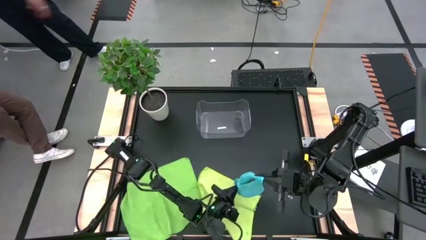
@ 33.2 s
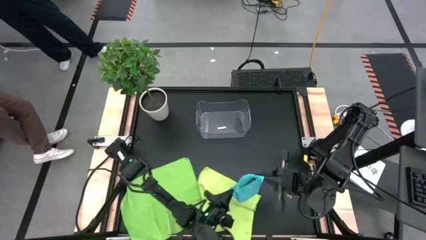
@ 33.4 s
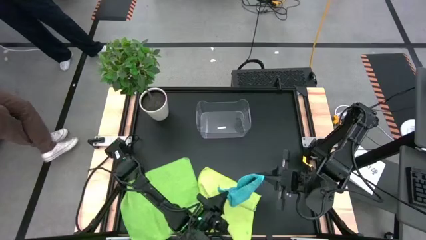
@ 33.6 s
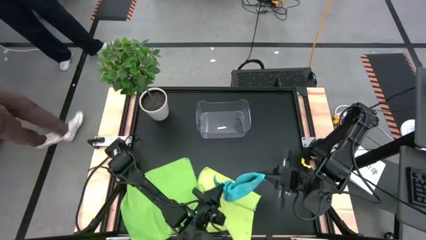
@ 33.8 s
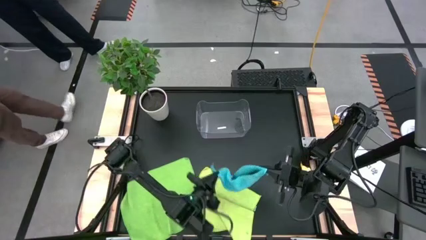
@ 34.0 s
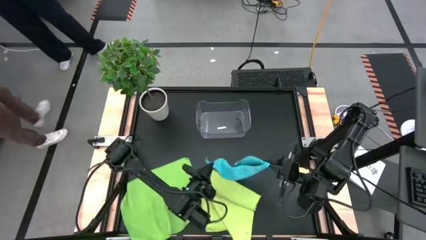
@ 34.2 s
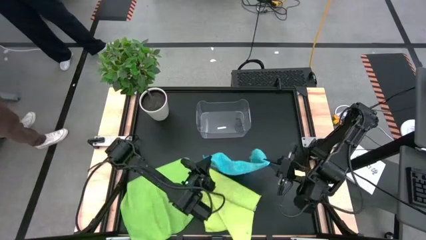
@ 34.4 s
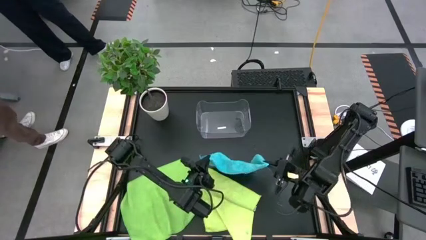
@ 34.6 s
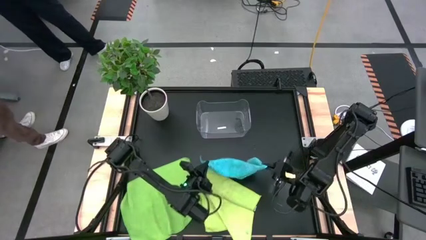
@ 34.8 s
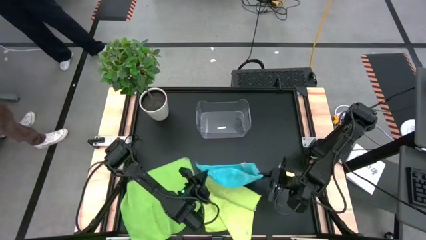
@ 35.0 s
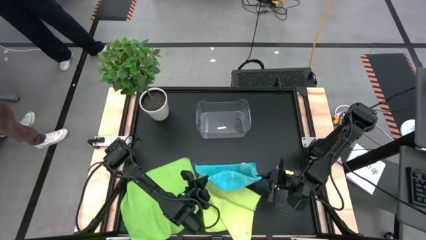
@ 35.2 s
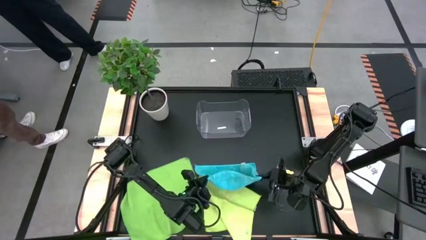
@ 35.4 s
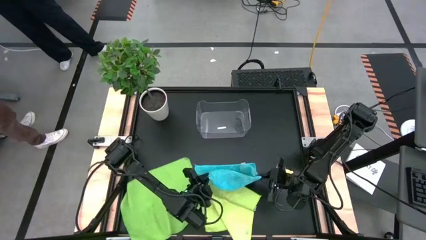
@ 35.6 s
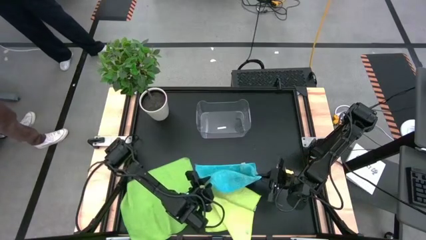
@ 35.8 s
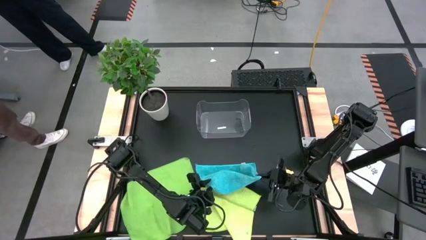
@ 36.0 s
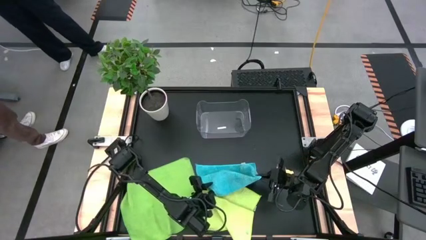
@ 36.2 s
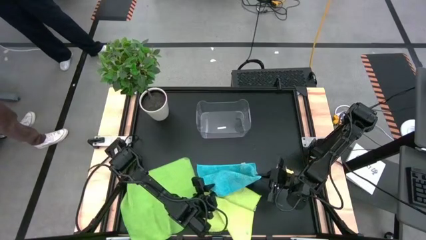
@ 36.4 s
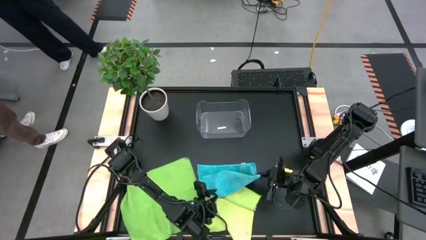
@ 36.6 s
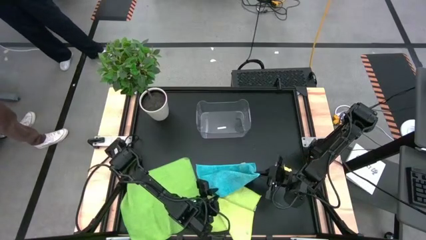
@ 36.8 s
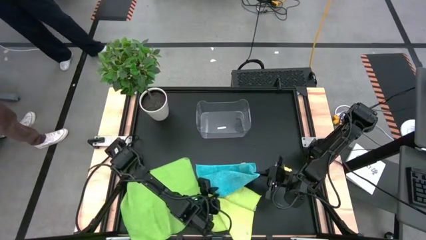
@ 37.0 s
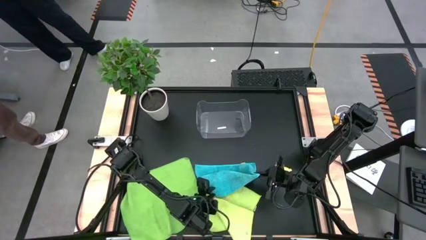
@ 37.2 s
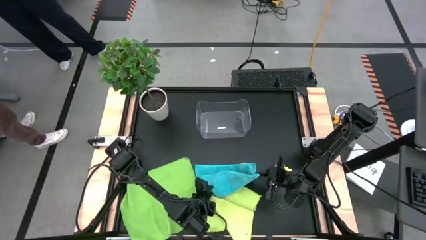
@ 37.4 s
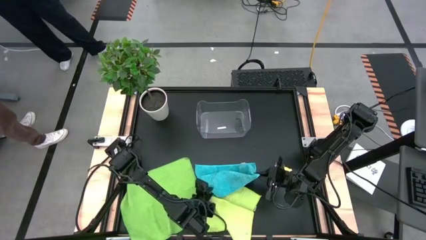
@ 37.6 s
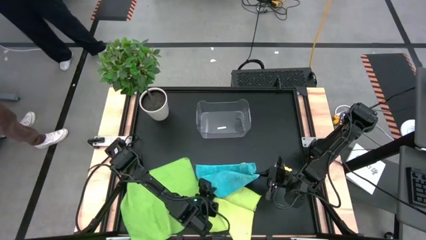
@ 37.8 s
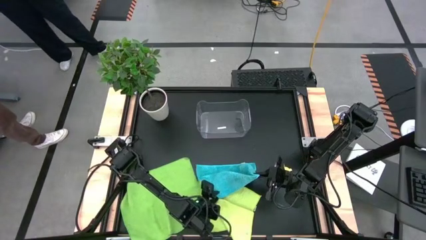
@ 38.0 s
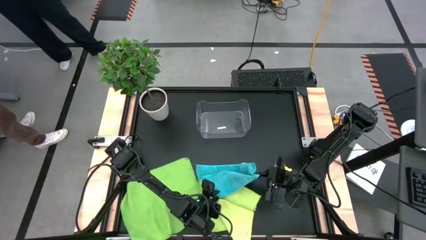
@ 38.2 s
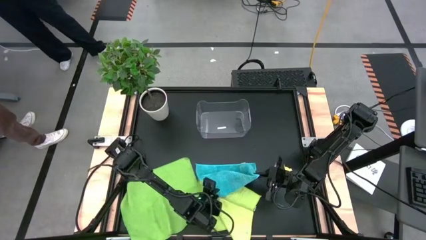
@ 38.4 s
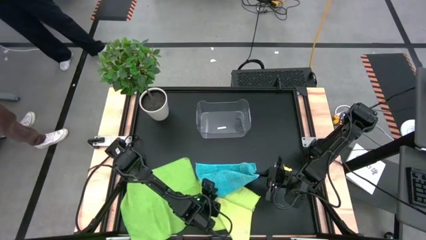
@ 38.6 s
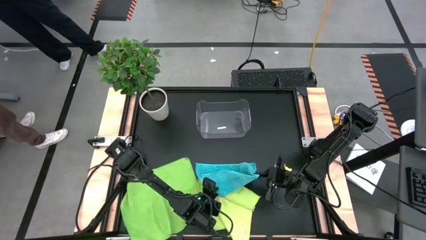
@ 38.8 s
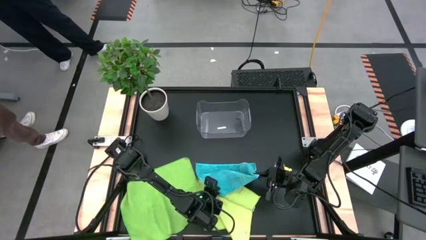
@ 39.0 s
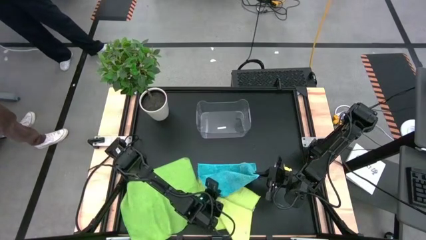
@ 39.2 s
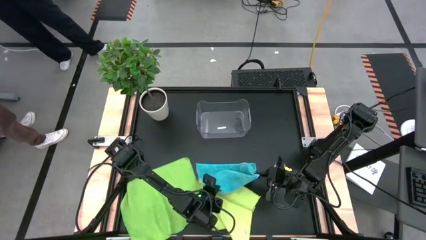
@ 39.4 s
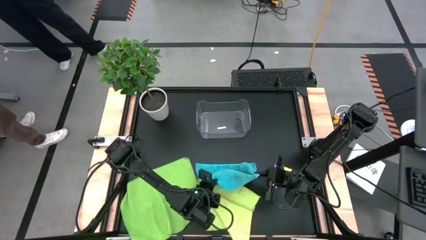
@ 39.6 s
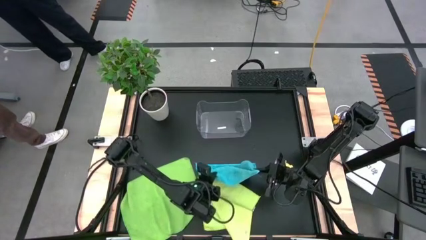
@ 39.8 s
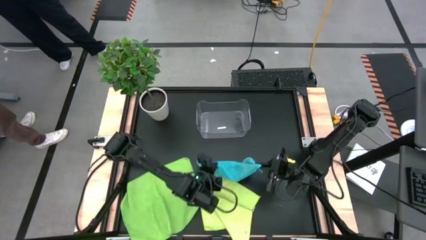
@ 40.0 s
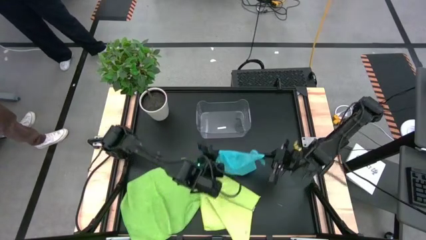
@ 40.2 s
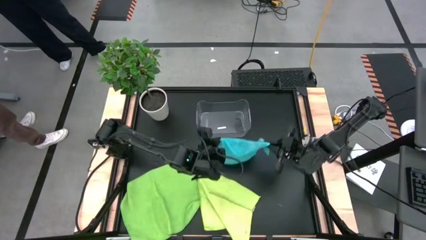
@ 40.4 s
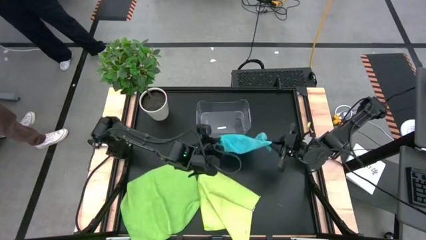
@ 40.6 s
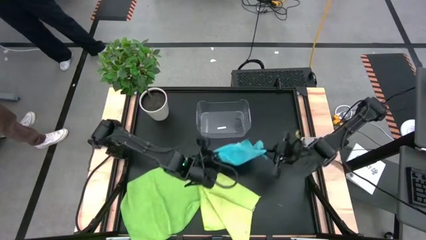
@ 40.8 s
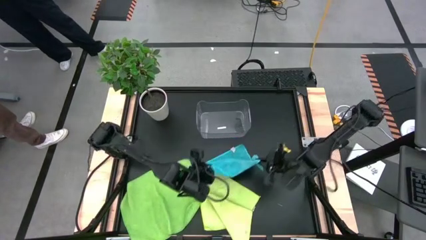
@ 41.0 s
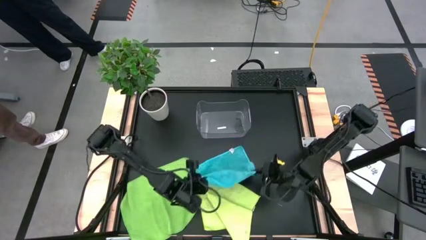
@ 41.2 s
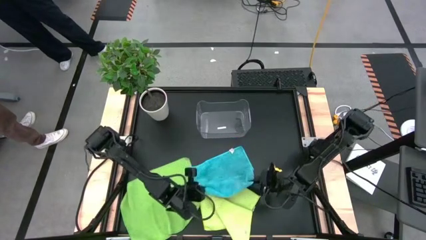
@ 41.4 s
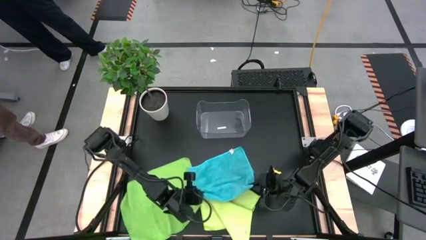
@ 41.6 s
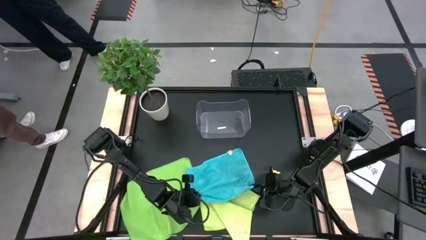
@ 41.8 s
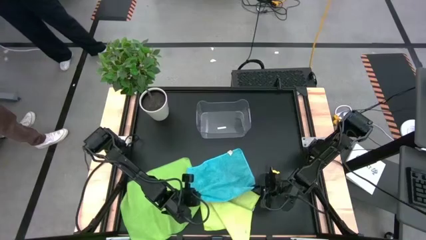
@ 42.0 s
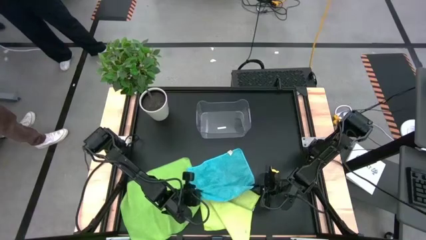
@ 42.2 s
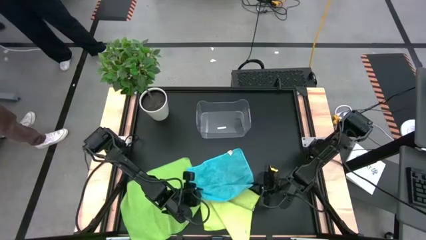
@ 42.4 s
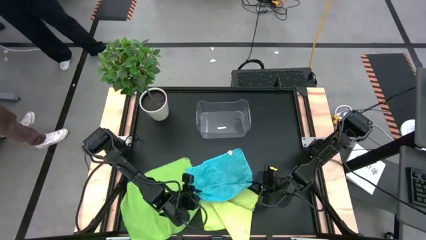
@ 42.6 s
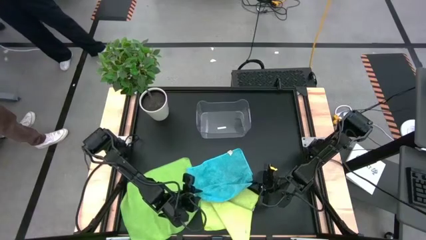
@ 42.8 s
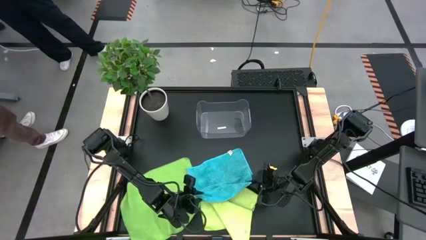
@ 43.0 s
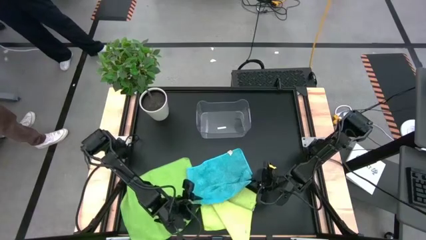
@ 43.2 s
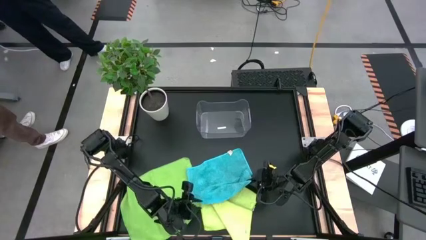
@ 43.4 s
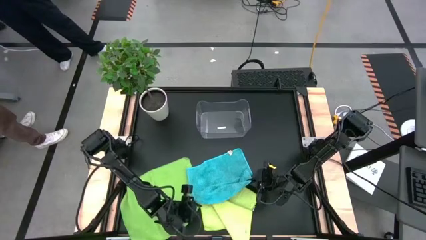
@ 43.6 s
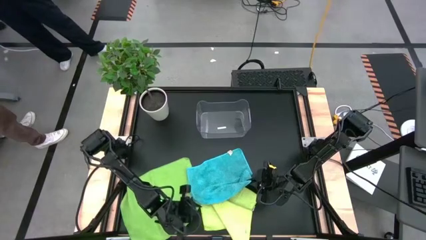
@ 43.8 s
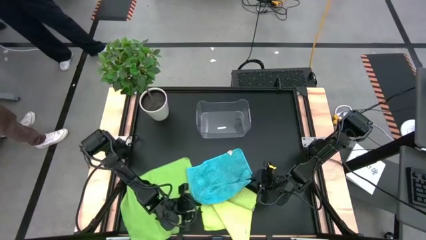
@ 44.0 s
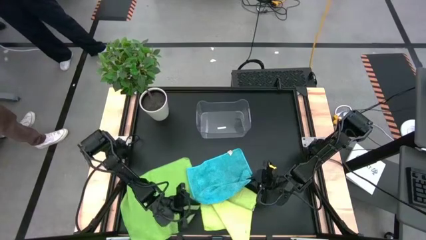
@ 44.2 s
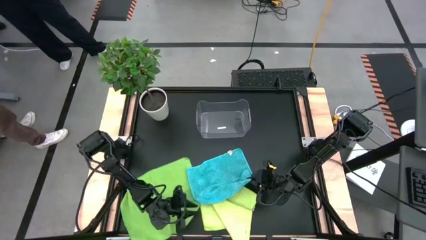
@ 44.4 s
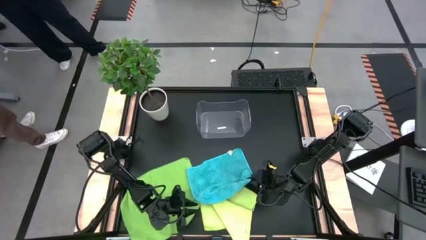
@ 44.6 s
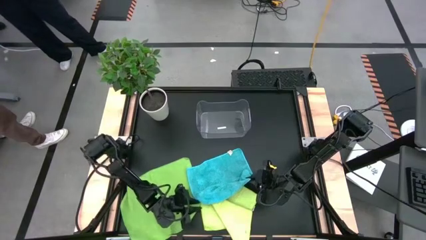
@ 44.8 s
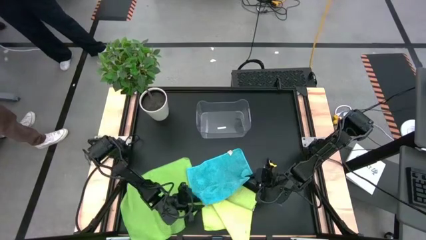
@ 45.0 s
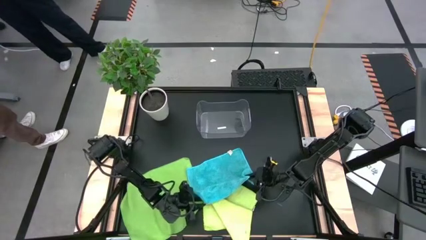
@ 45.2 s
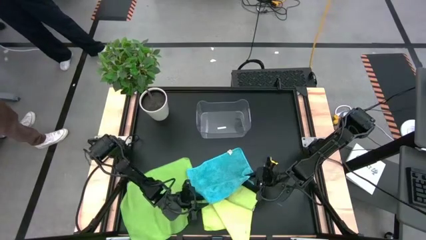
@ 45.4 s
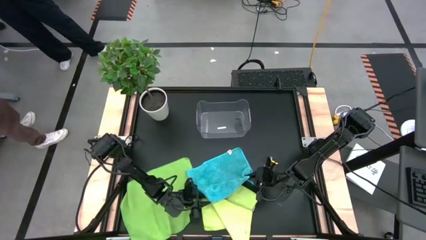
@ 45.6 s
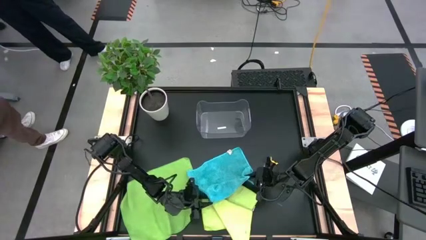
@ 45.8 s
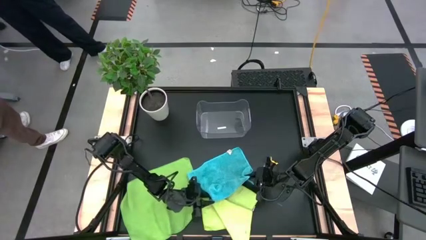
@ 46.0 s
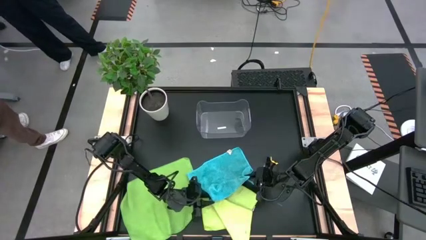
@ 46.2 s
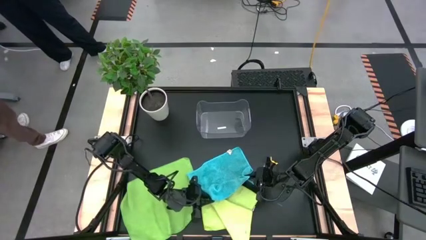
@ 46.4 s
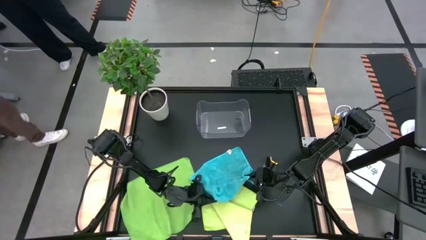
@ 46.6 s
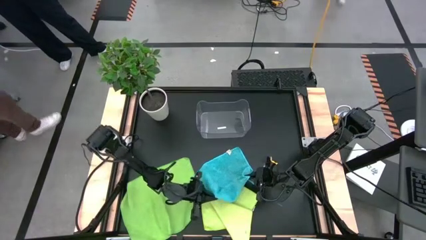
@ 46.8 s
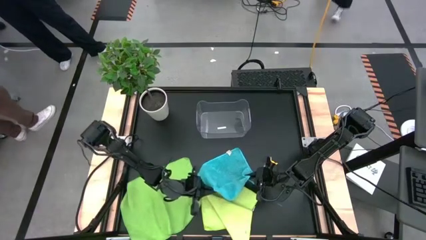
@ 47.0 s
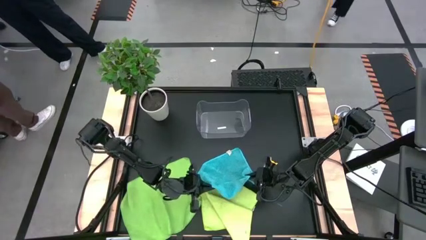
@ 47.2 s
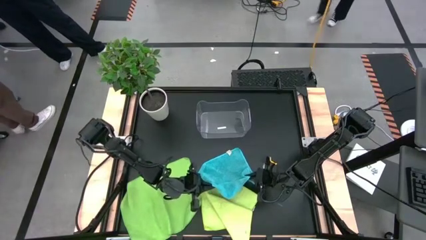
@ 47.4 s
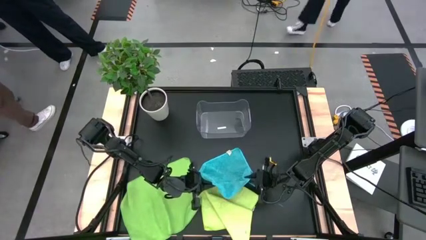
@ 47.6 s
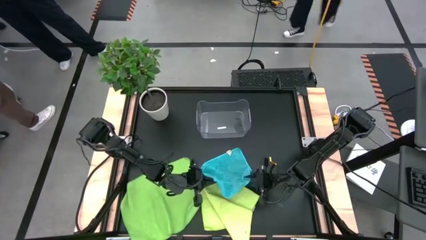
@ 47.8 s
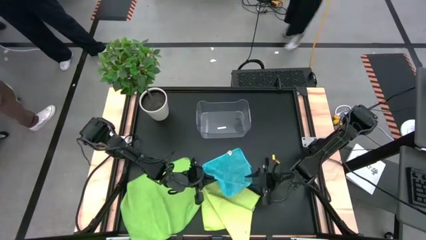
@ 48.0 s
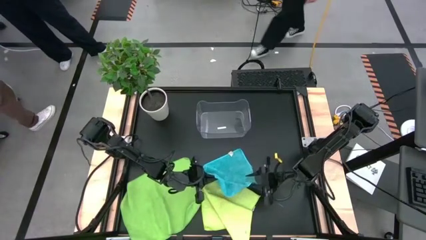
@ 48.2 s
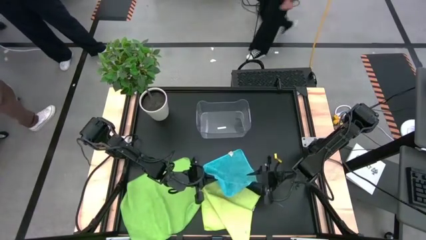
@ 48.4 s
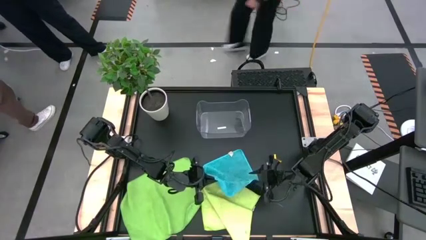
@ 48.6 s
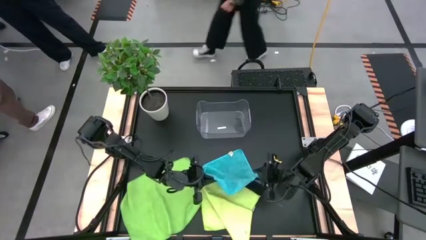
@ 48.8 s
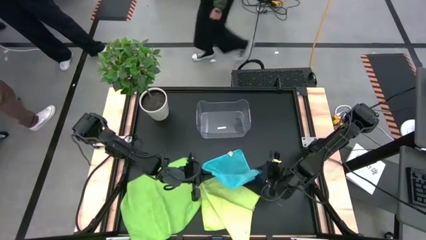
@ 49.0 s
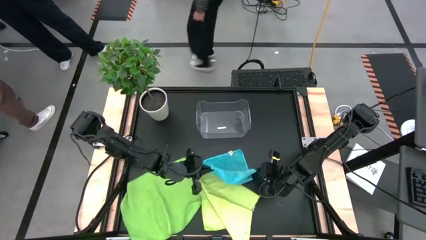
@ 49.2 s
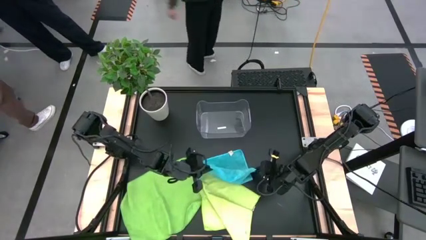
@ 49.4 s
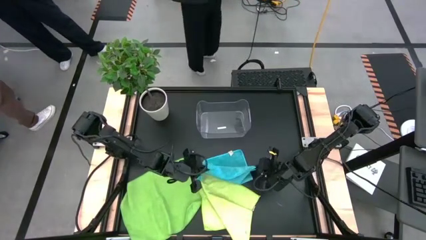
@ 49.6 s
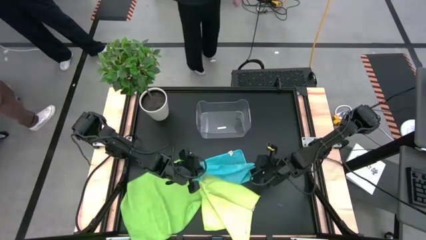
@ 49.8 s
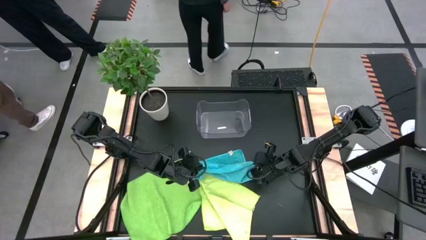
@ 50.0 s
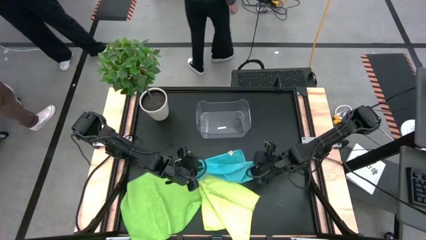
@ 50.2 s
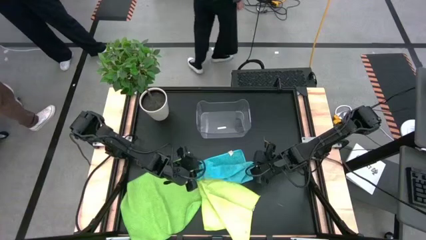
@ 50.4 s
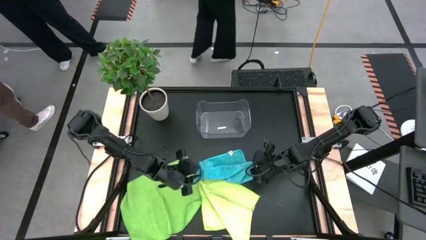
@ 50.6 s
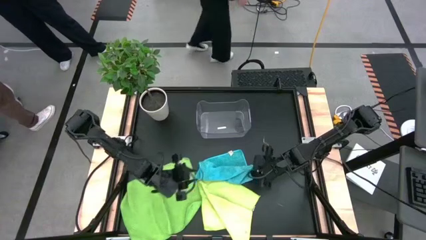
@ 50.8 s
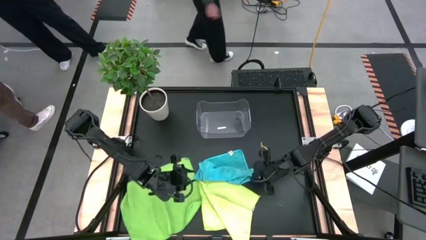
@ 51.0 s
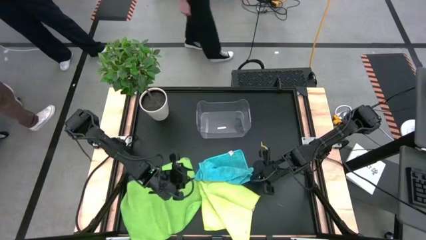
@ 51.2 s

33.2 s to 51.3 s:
Task: Fold microfiber towels
Fold the blue towel
